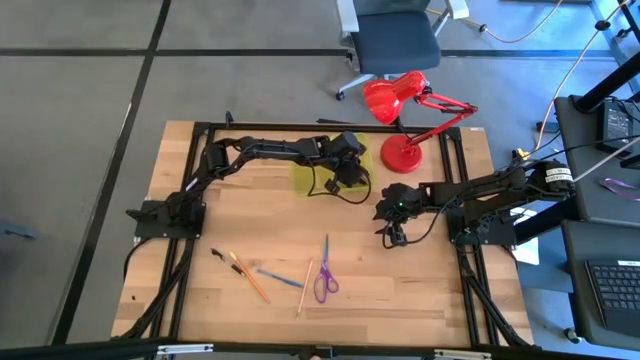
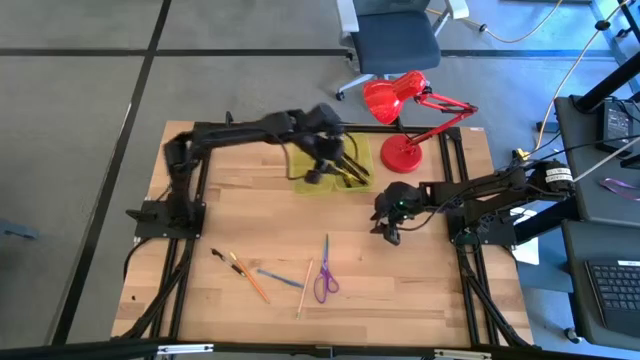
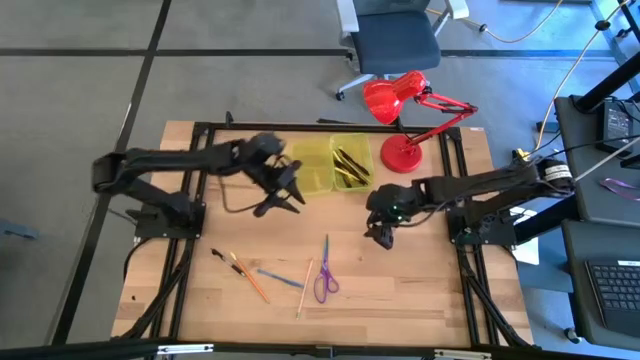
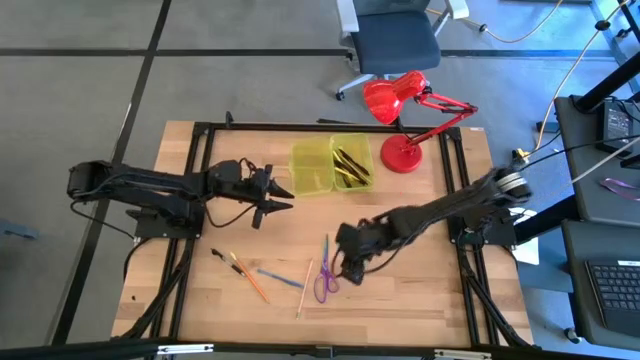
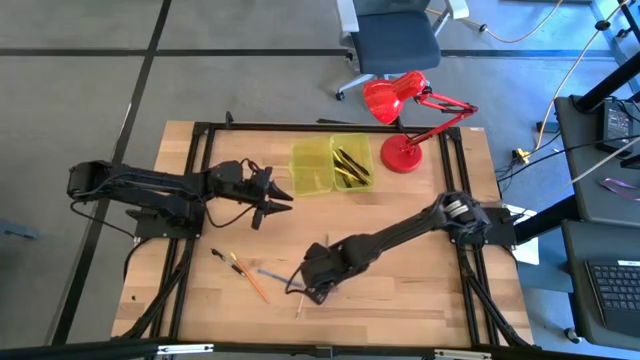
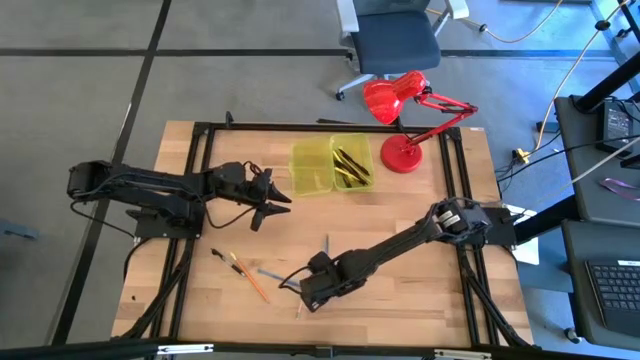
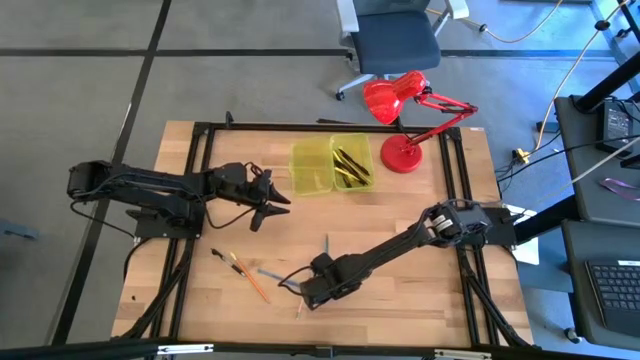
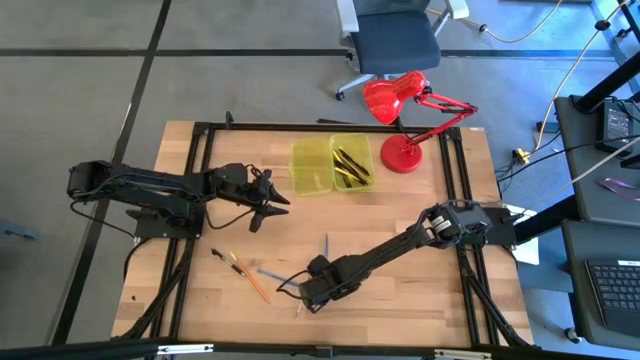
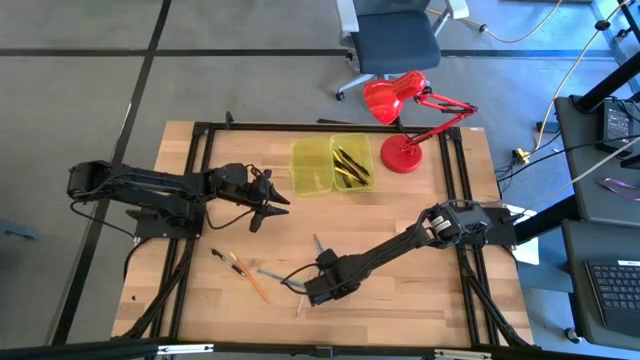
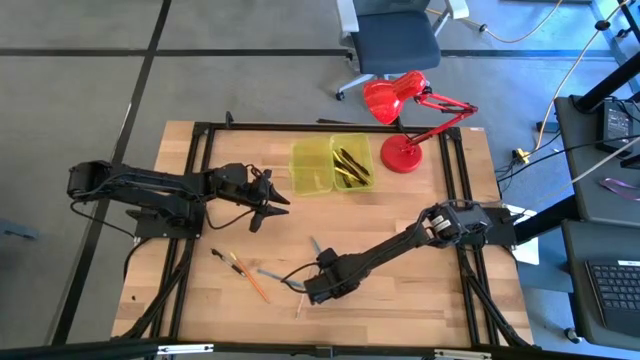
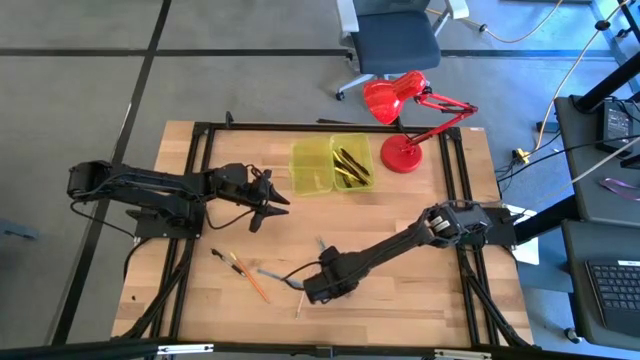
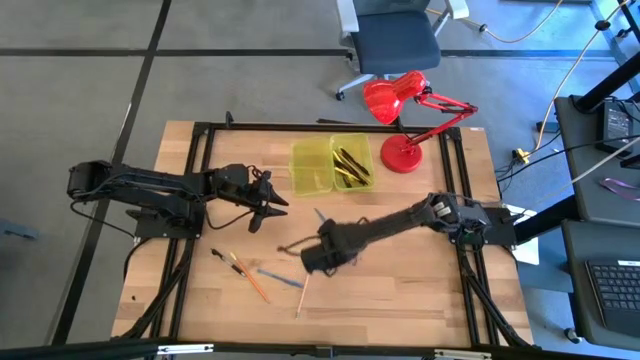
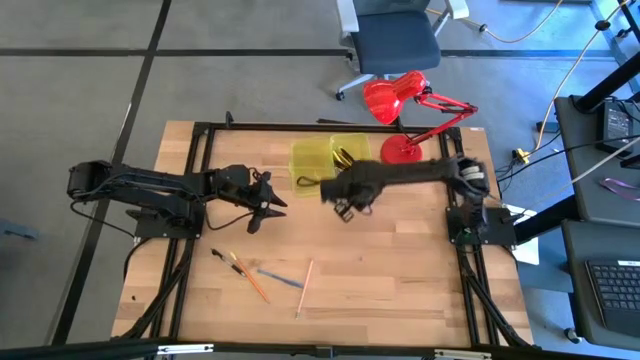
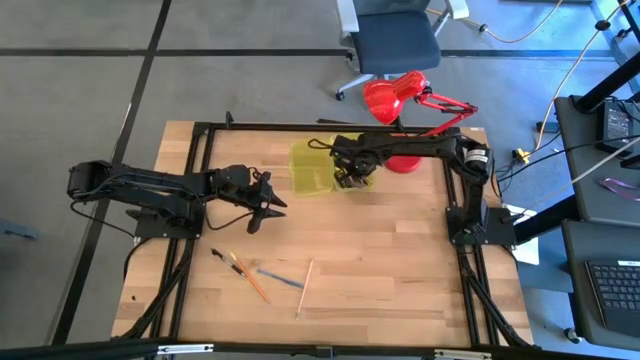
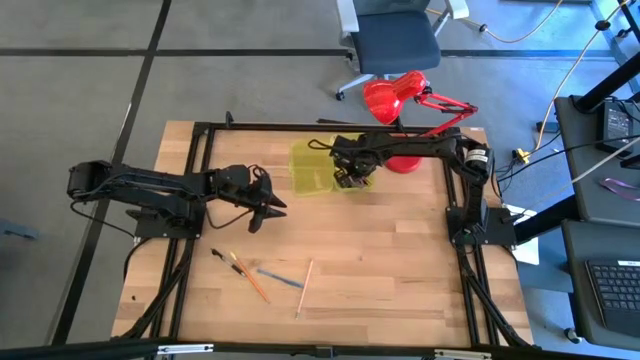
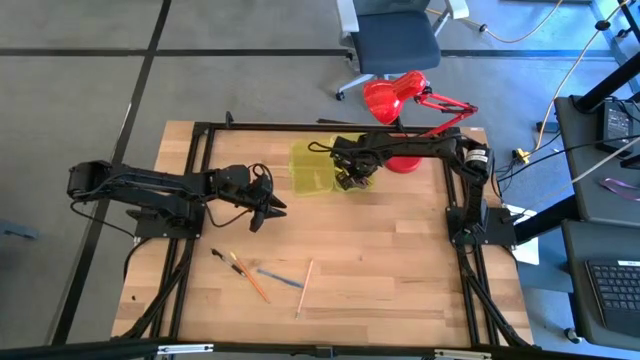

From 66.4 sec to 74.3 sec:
Task: Pick & place school supplies into a supply box
Put the purple scissors into the yellow supply box

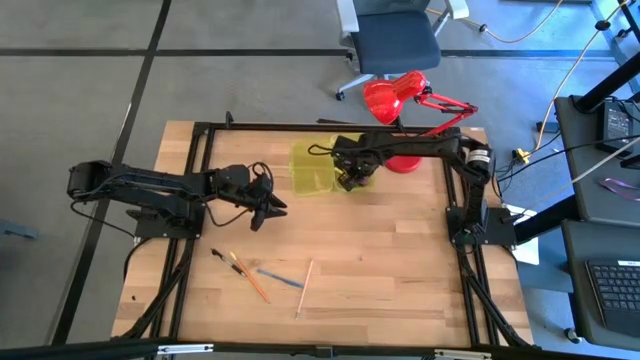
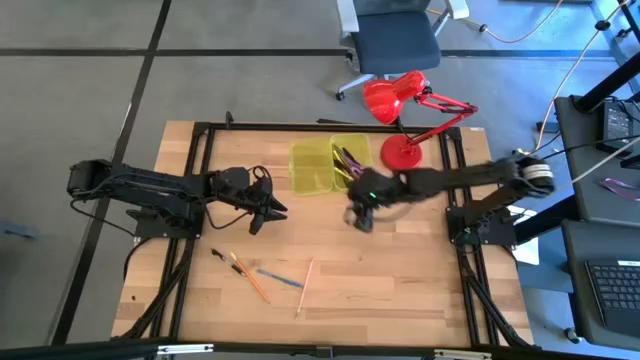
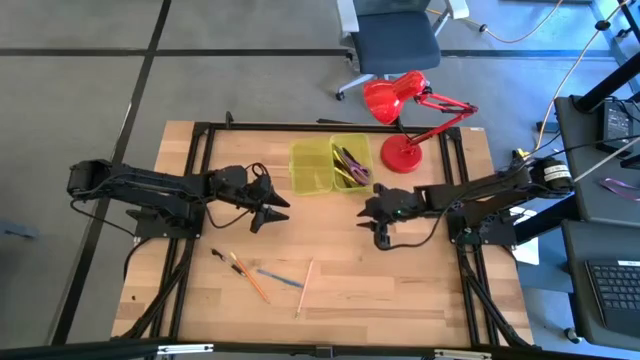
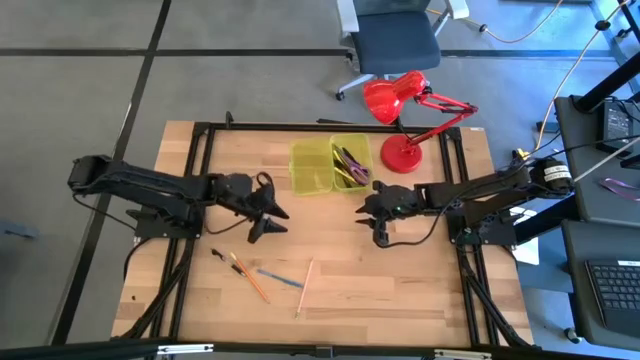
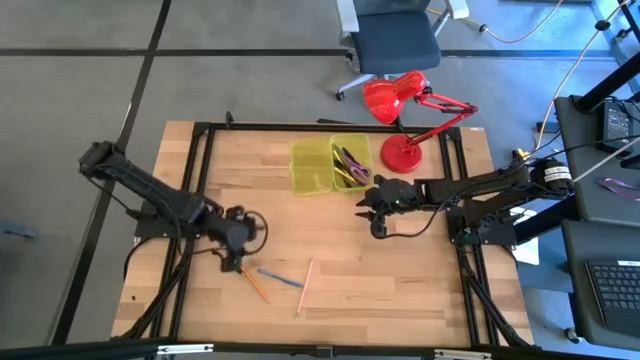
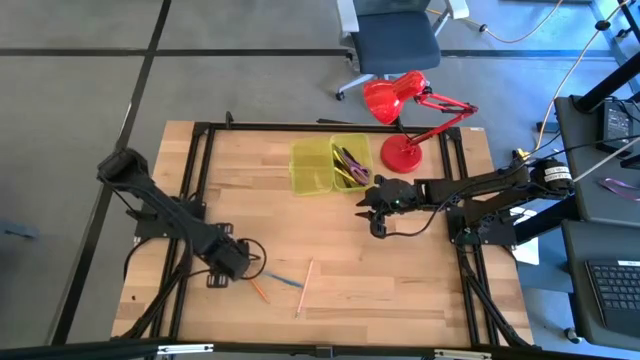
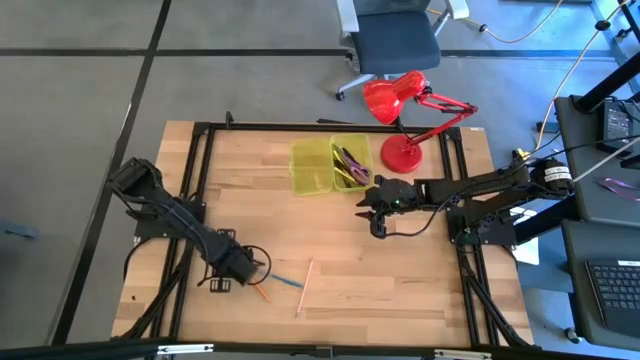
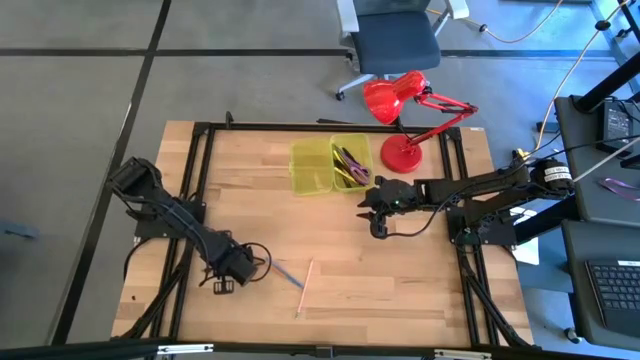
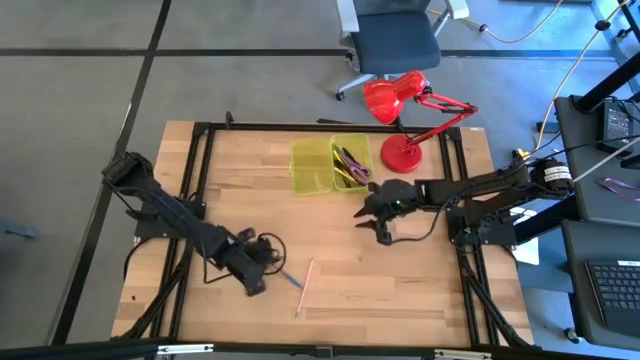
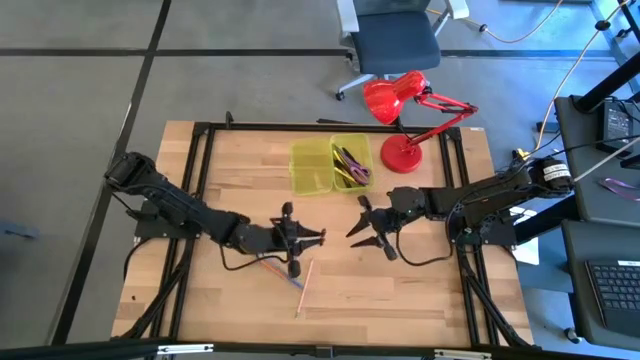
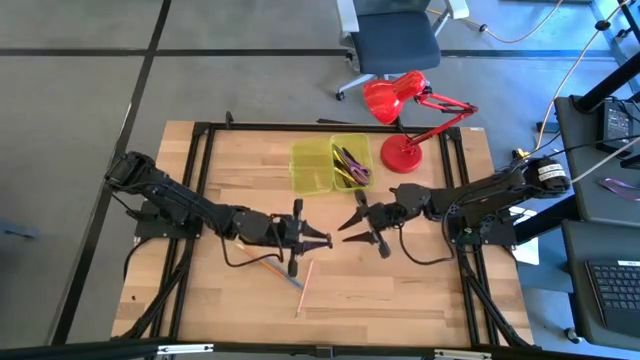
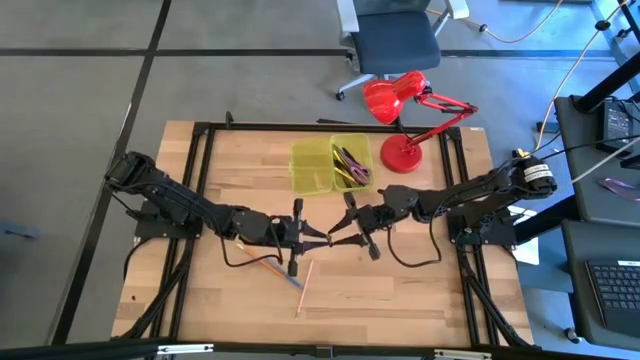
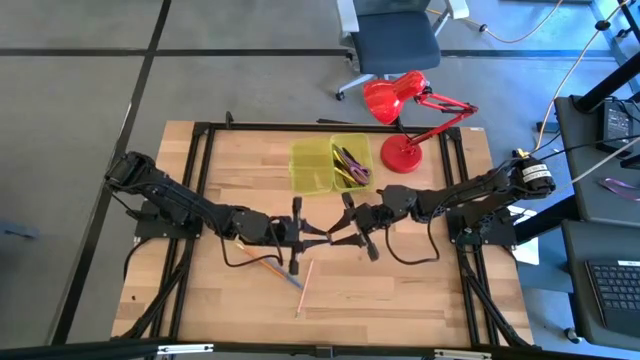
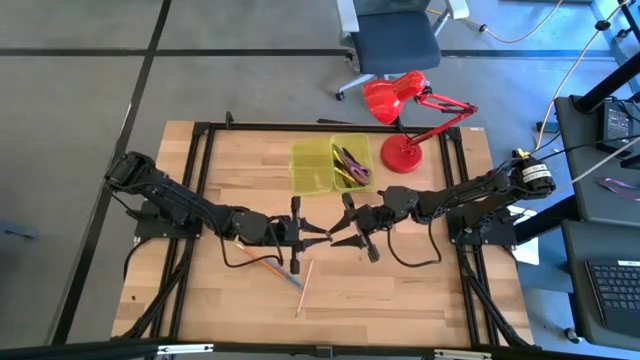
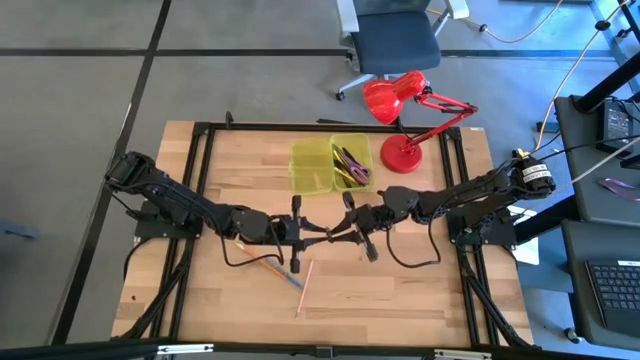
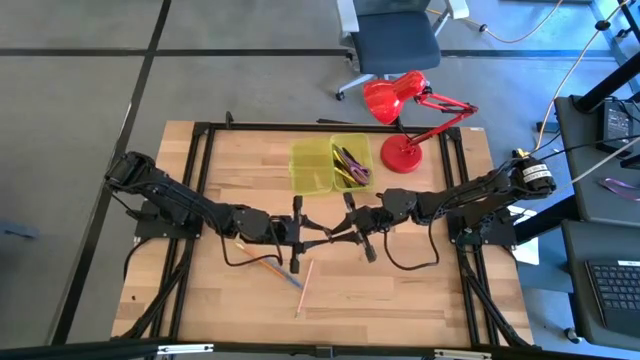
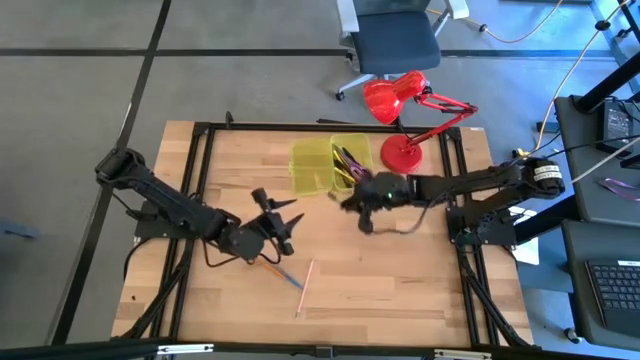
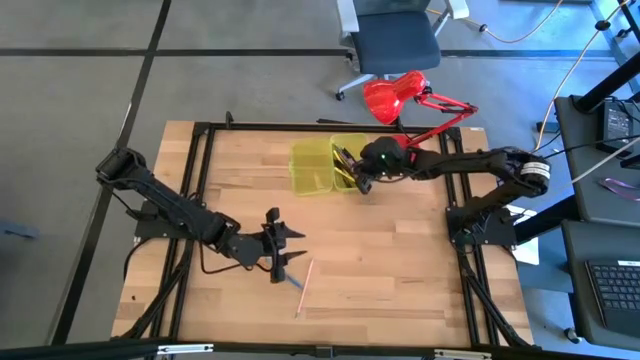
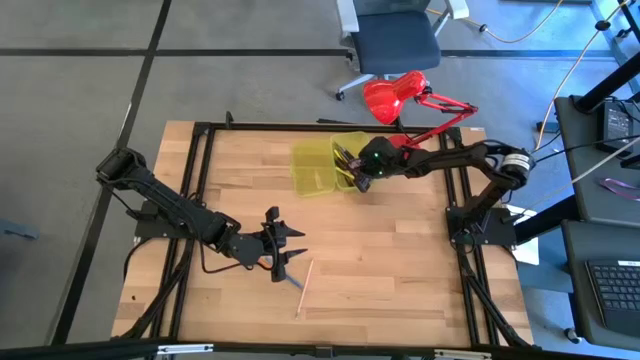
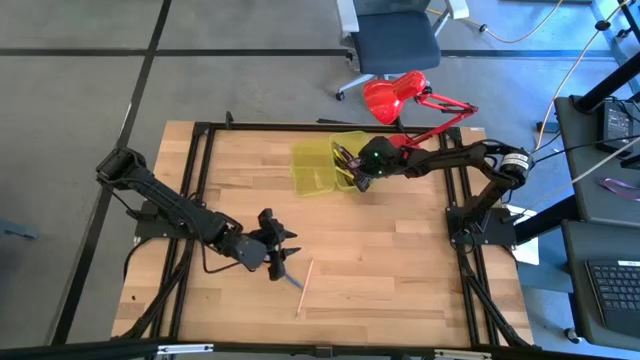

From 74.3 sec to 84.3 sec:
Put the black transparent pen into the yellow supply box

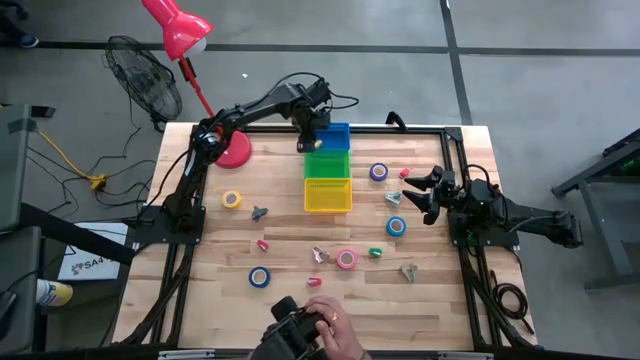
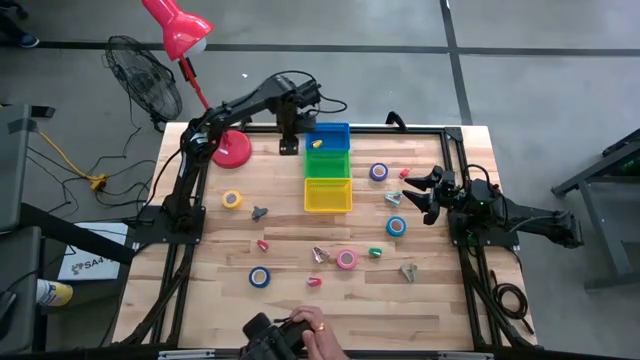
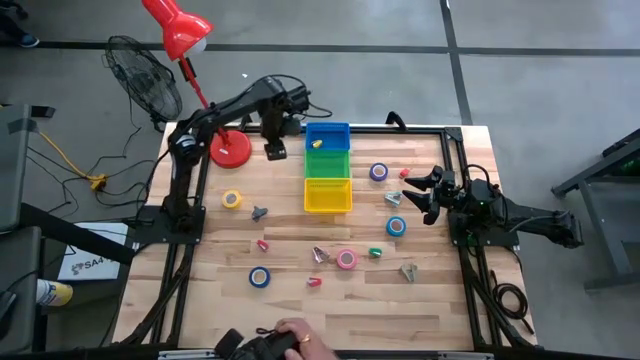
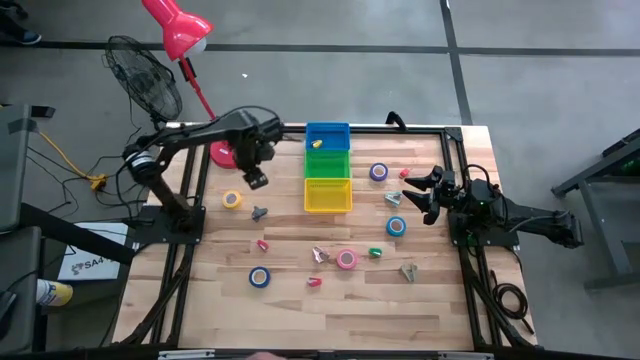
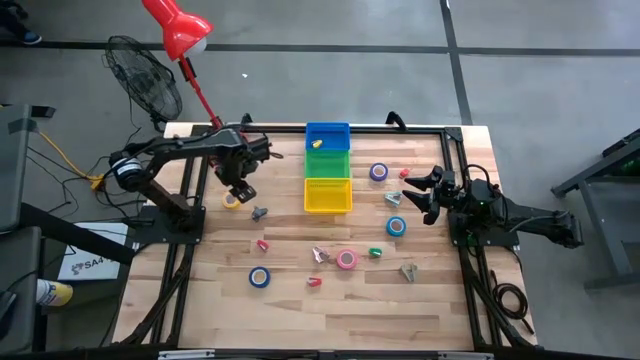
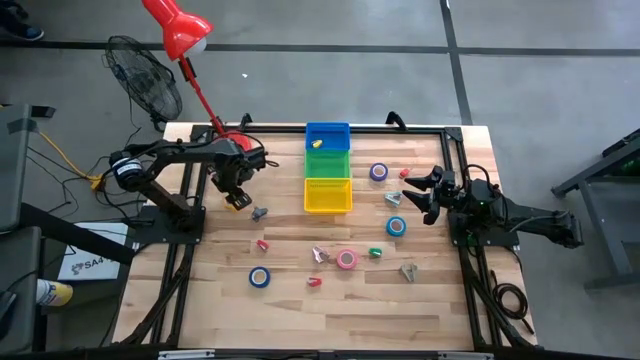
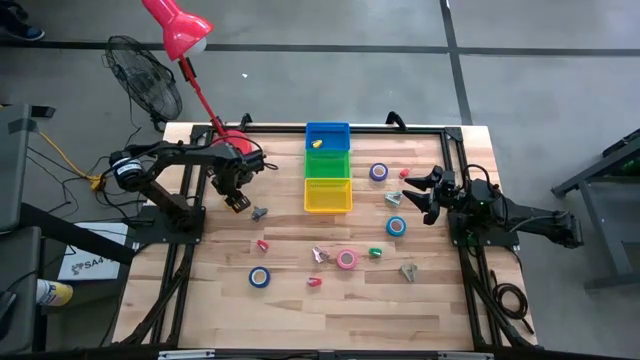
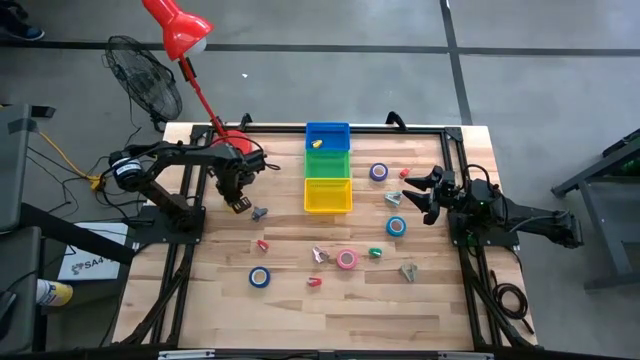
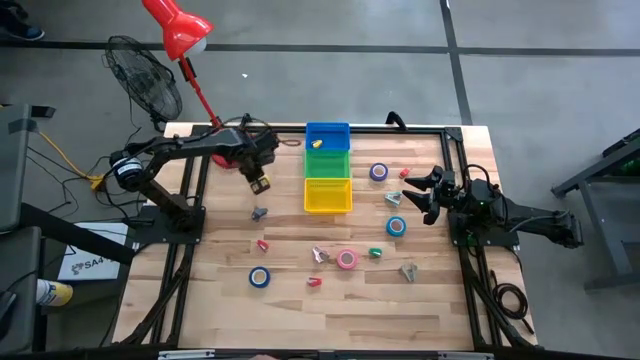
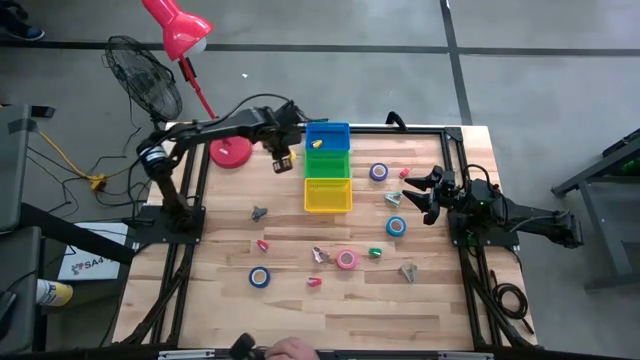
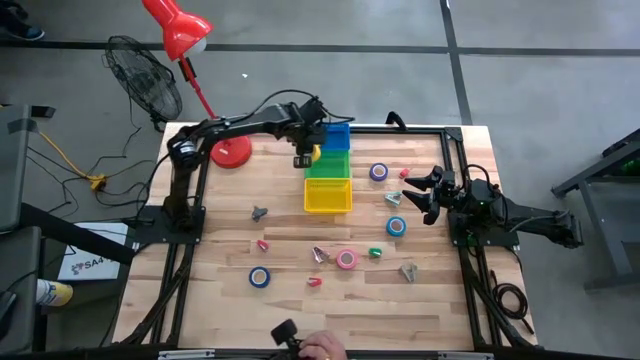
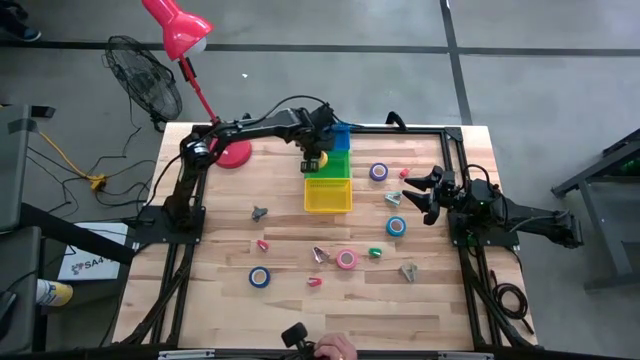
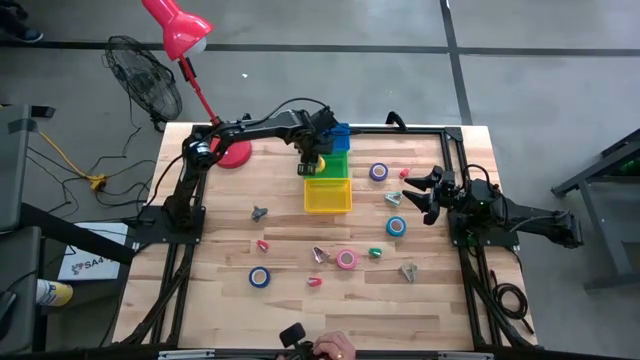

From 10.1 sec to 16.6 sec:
Task: Pick and place Stapler, Stapler remover, tape
Put the yellow tape into the green bin
